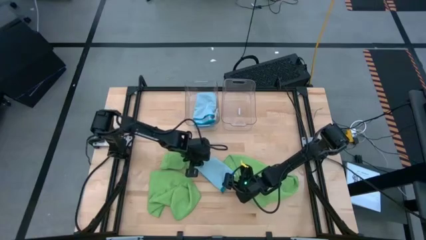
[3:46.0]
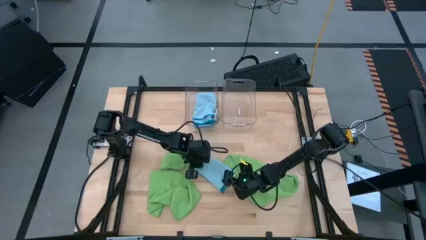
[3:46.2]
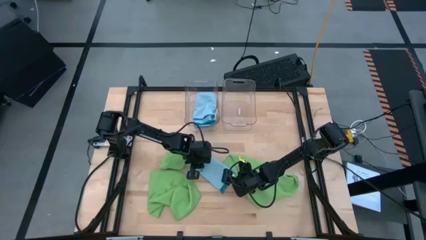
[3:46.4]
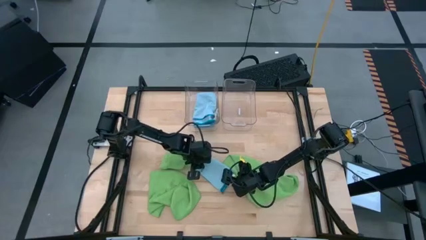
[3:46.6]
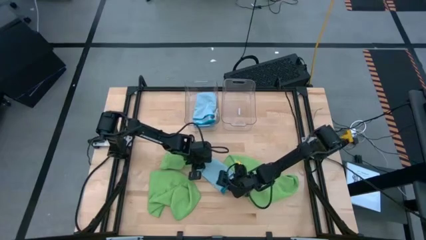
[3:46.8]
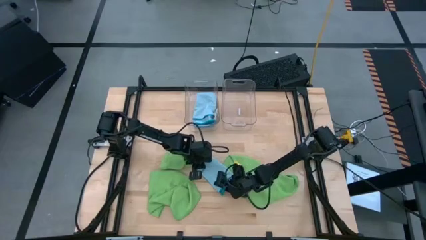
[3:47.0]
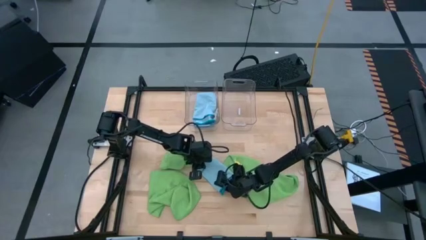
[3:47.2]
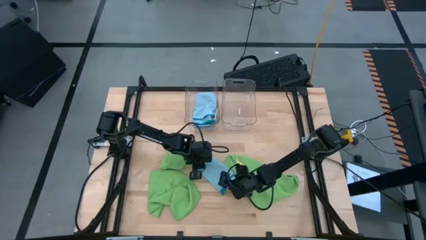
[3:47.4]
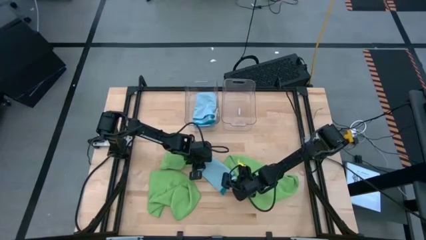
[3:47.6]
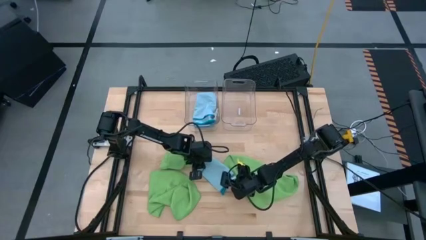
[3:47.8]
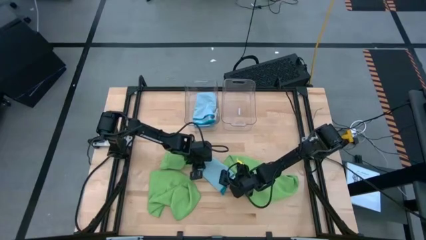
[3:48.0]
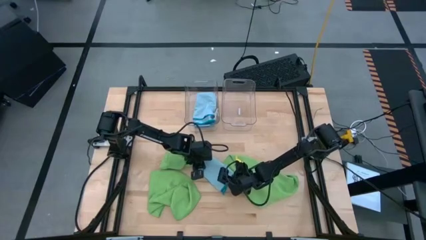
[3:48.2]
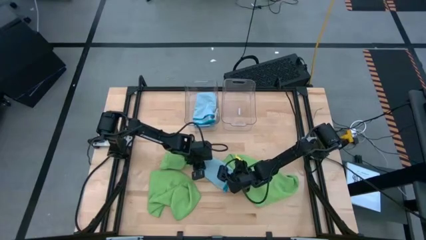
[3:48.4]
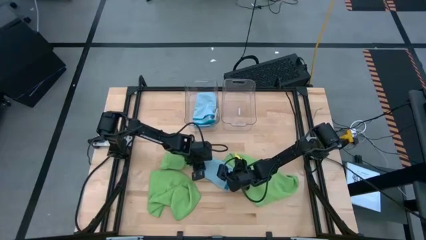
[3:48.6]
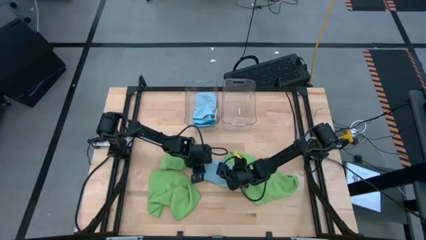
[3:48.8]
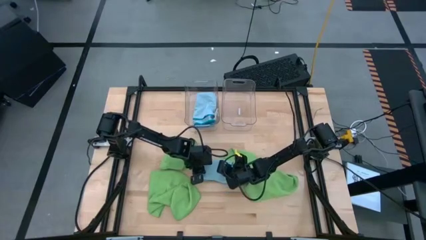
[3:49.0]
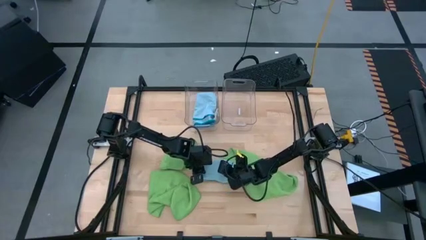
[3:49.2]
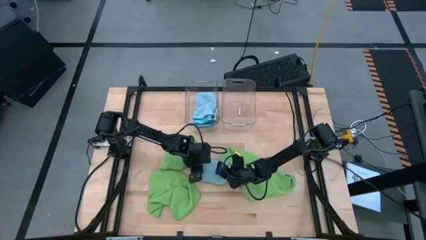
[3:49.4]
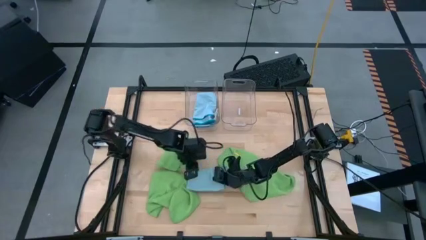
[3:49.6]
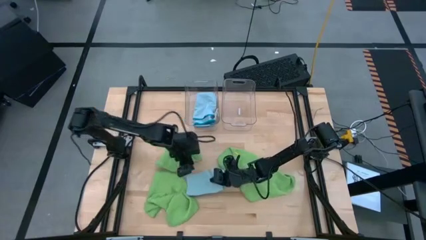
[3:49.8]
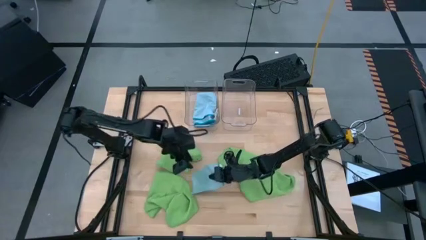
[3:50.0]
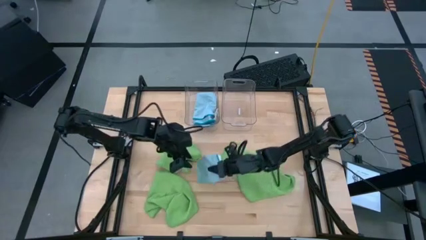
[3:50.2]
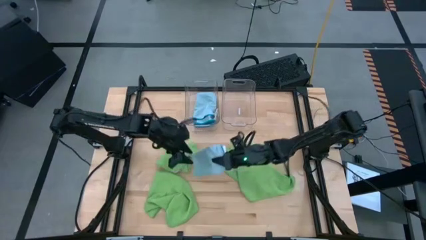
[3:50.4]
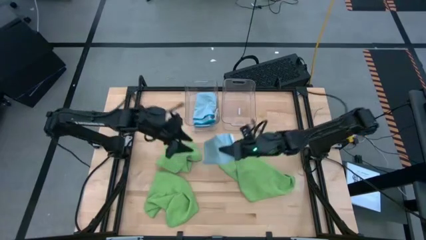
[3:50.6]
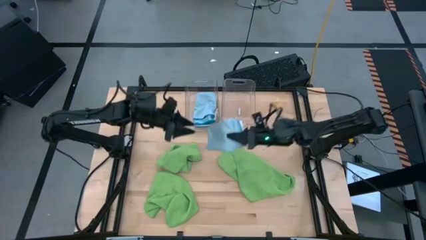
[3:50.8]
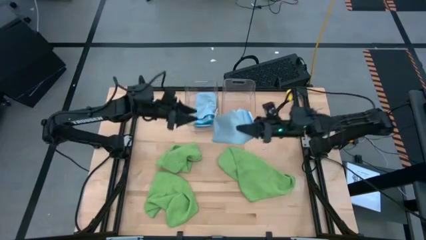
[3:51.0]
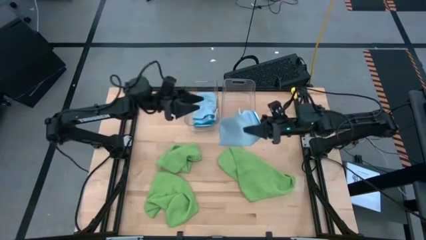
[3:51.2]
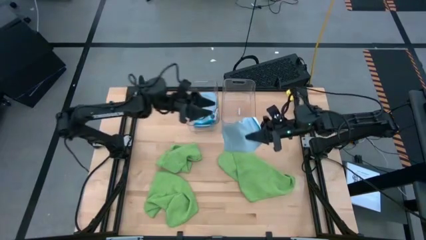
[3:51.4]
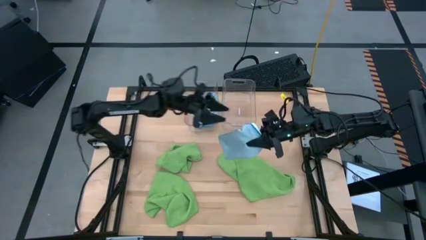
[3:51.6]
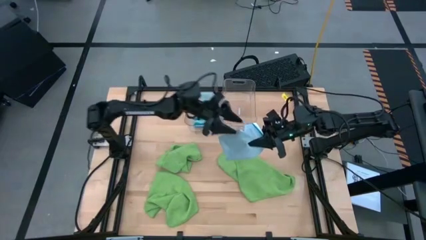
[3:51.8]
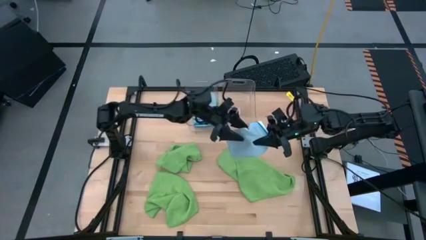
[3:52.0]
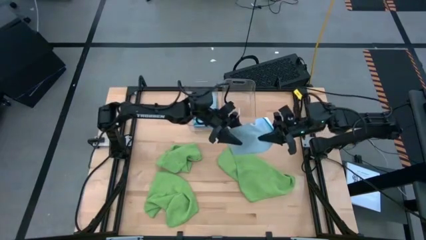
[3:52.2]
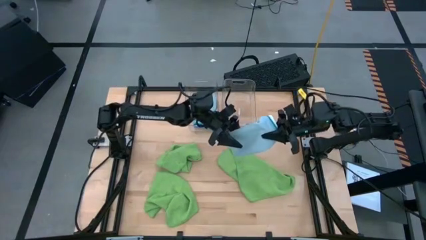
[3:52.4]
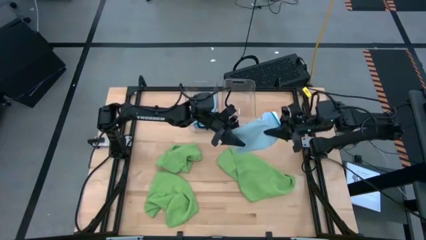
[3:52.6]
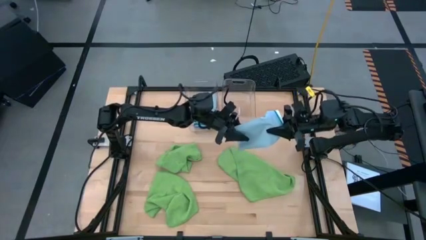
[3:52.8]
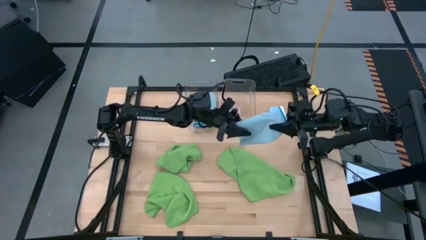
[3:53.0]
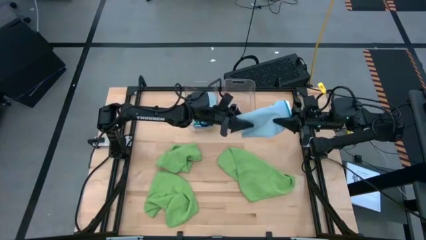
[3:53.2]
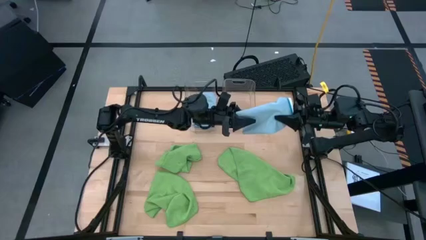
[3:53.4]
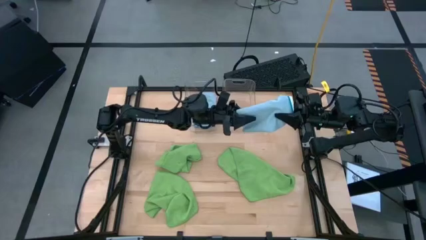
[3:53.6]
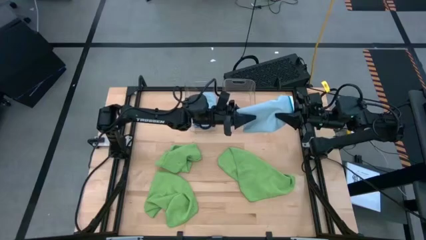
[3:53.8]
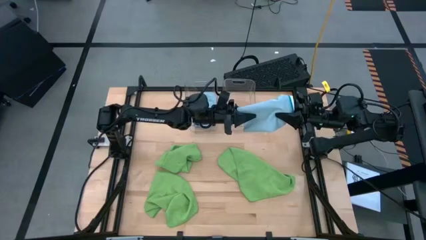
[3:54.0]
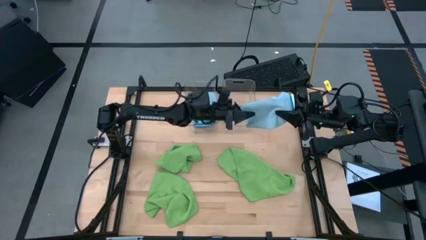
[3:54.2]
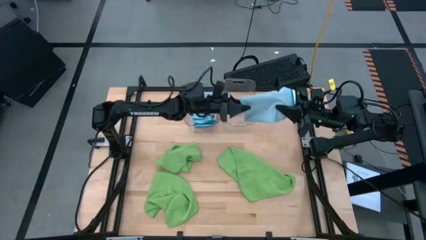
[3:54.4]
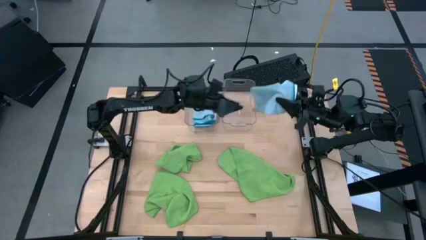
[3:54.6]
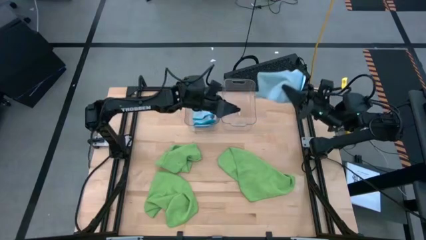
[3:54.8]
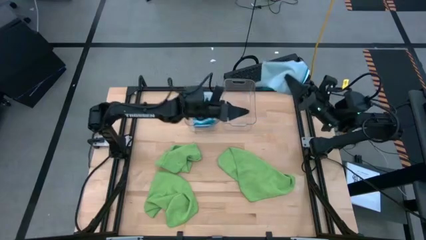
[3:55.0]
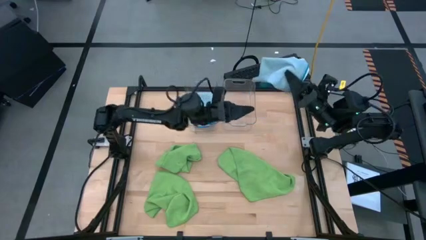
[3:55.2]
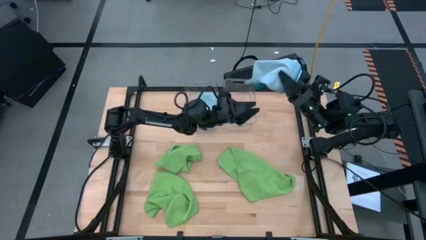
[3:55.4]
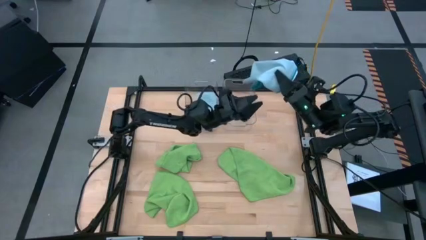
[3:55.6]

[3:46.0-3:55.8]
Task: Fold microfiber towels
Stack the folded blue microfiber towel on top of the other blue microfiber towel in the left transparent bin

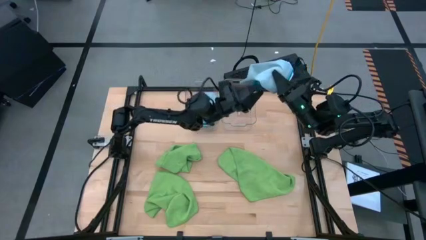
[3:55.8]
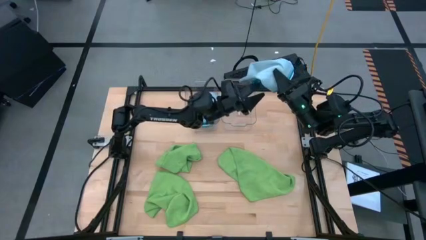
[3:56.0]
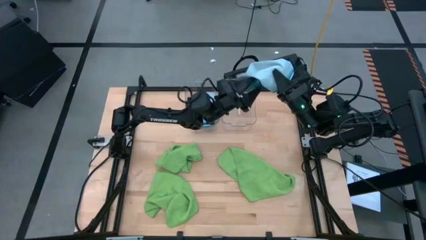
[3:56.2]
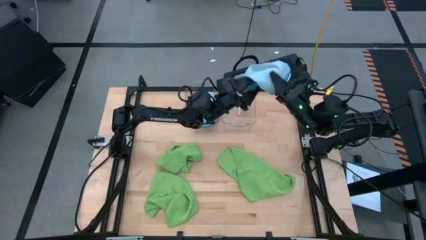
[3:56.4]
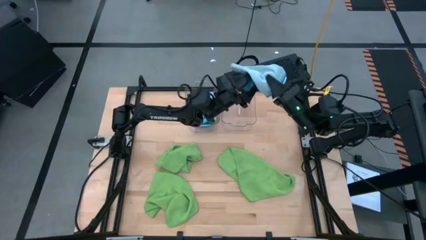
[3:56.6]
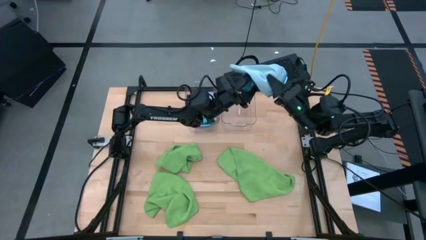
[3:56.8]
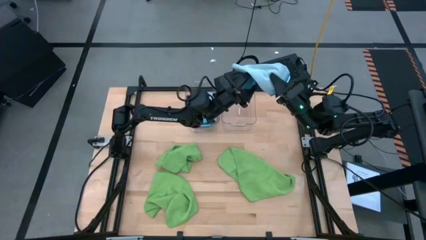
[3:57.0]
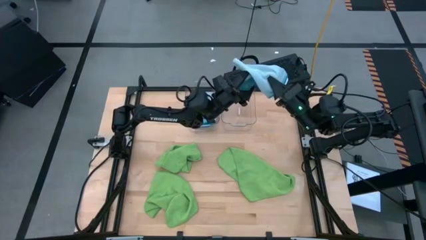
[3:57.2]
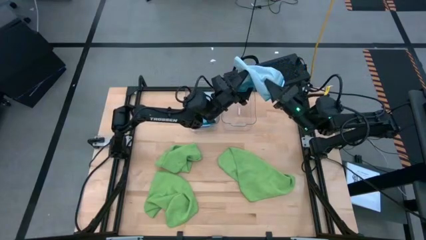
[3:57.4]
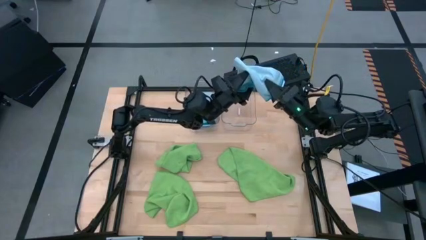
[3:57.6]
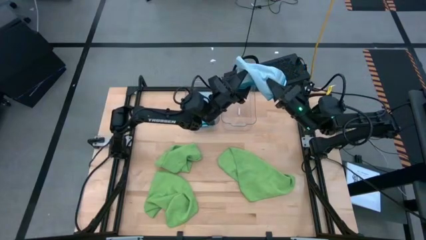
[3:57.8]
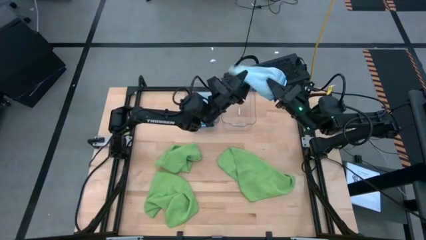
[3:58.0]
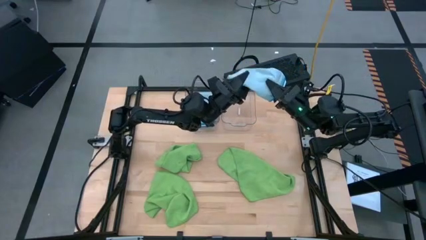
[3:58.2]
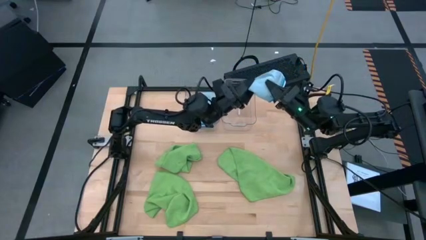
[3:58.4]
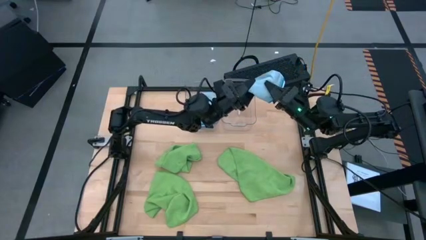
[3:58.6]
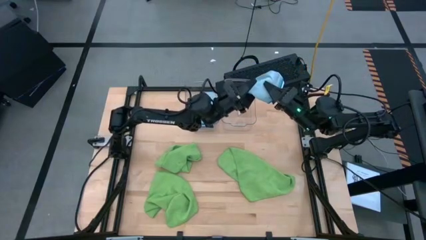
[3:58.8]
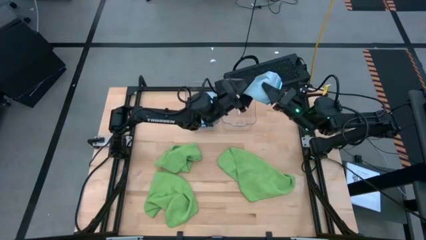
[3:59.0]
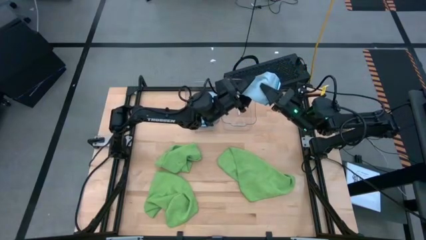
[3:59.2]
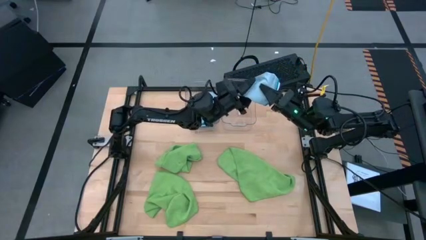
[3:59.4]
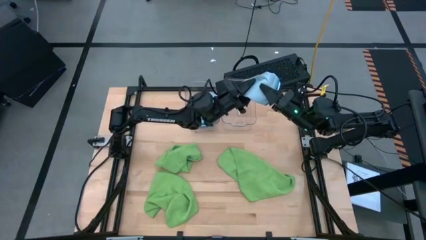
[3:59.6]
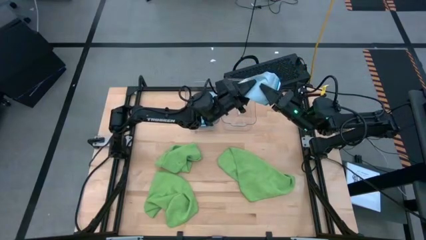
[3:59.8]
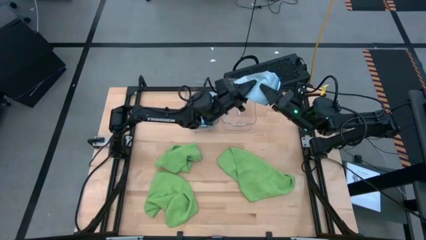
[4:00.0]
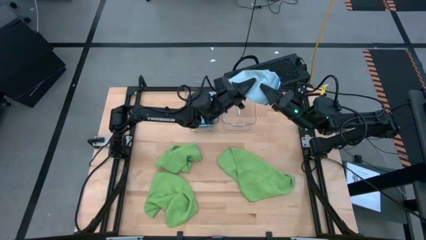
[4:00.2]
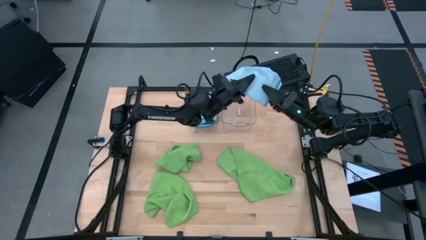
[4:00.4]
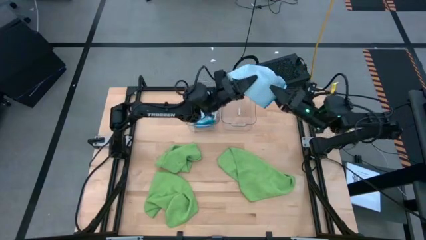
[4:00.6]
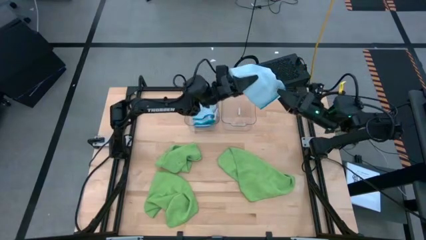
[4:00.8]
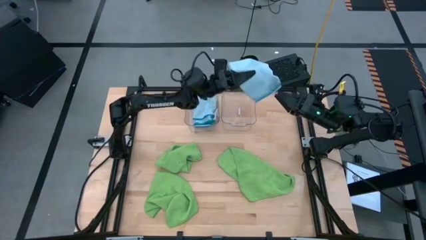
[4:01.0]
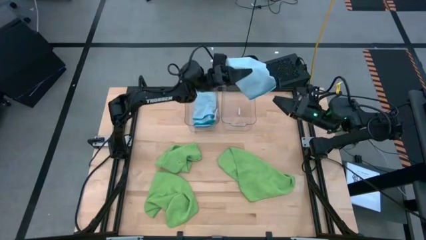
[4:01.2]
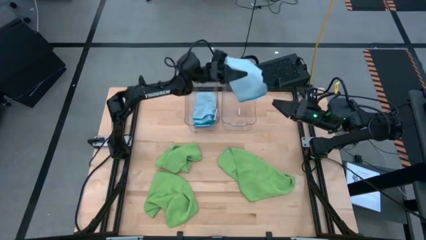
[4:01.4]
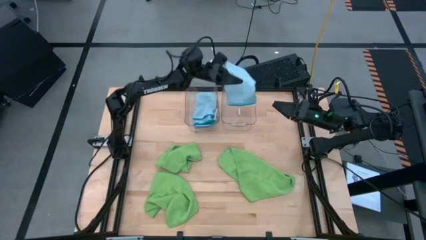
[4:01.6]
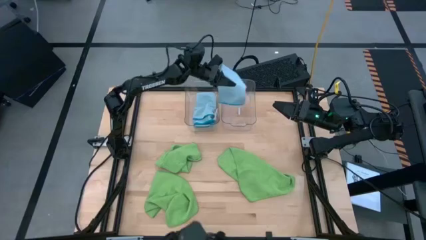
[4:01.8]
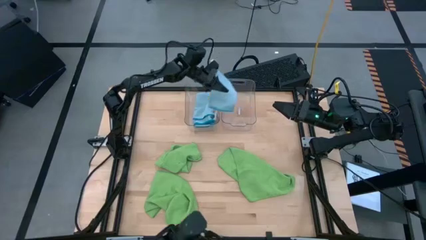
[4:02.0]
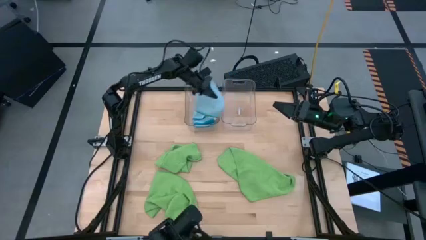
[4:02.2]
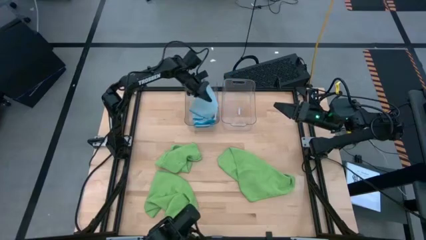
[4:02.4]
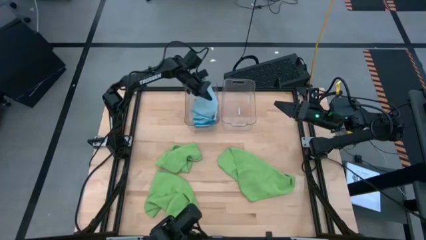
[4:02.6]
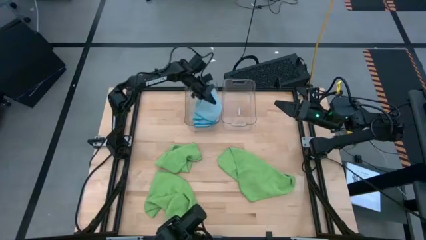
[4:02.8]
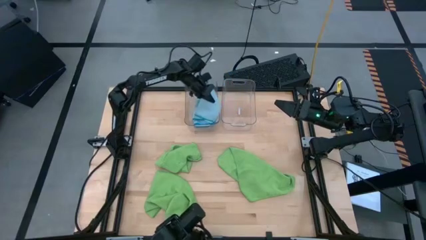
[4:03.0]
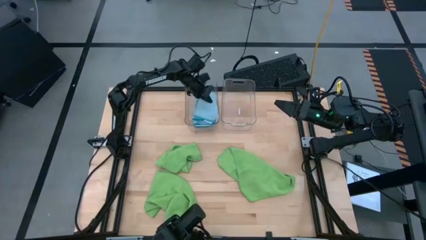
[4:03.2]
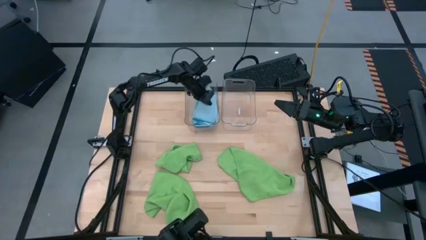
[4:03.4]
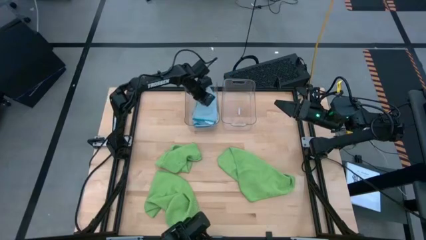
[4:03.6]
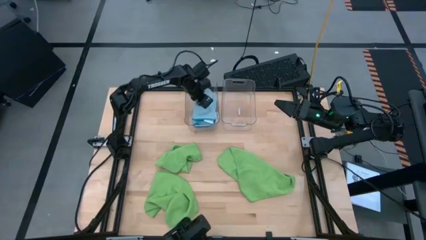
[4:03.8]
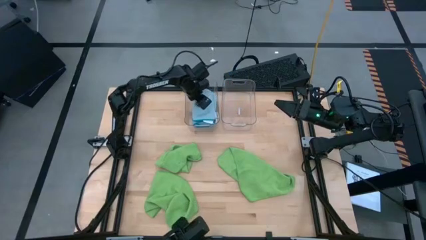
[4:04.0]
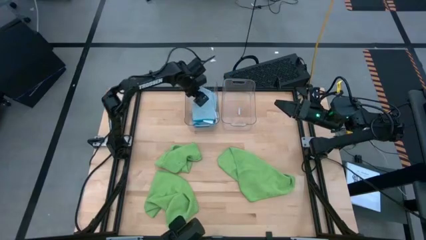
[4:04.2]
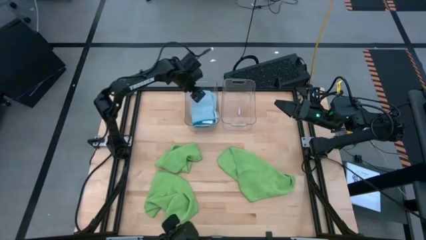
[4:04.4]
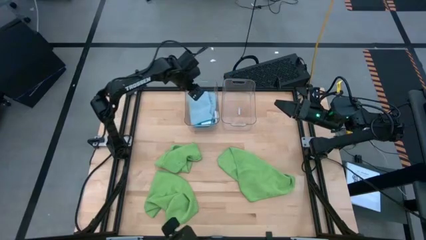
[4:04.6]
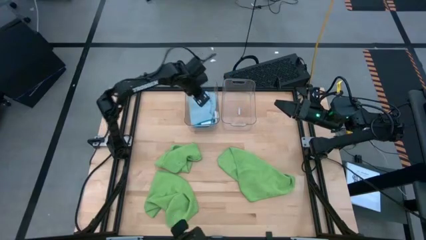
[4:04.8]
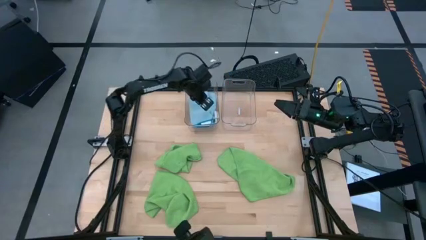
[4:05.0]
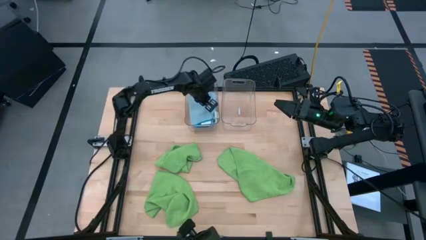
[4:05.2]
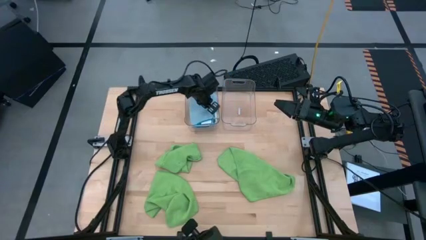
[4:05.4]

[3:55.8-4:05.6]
Stack the folded blue microfiber towel on top of the other blue microfiber towel in the left transparent bin
